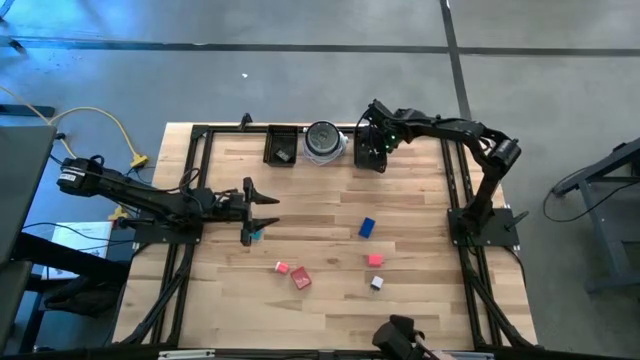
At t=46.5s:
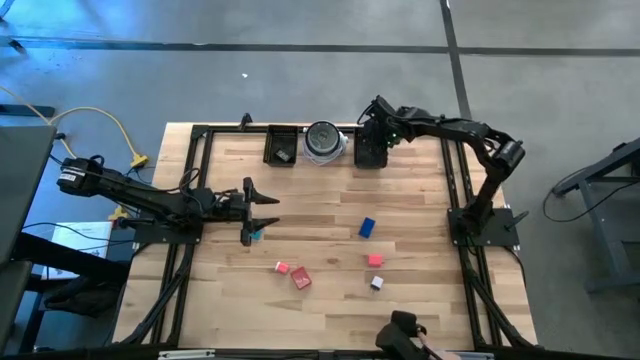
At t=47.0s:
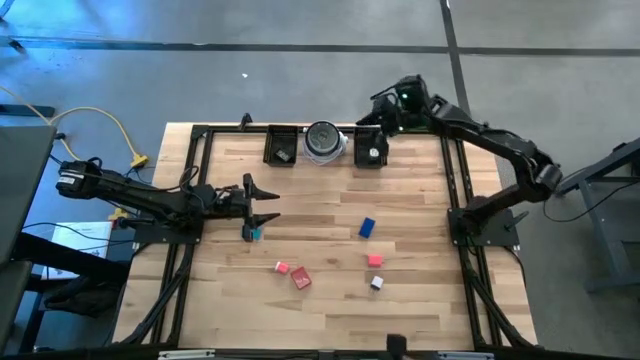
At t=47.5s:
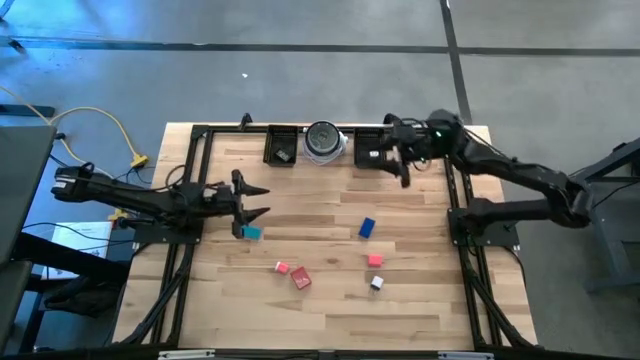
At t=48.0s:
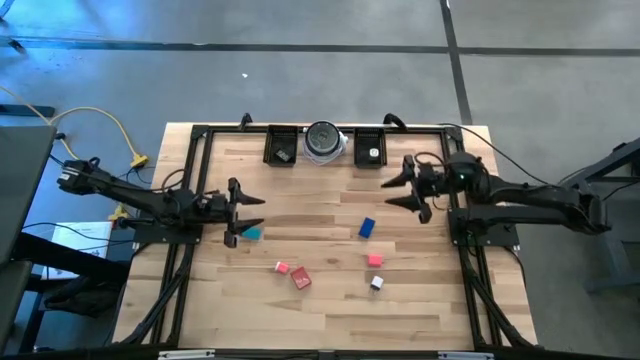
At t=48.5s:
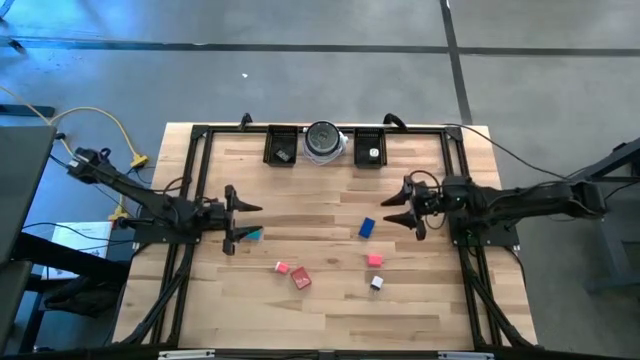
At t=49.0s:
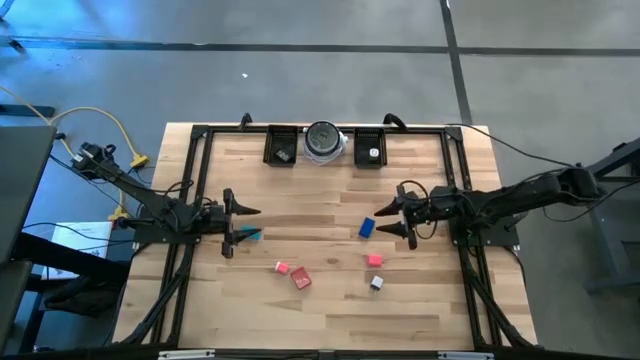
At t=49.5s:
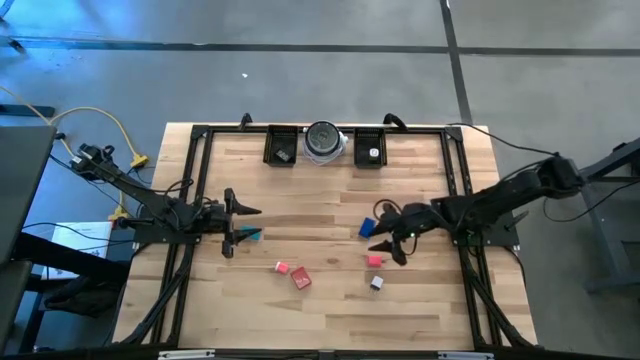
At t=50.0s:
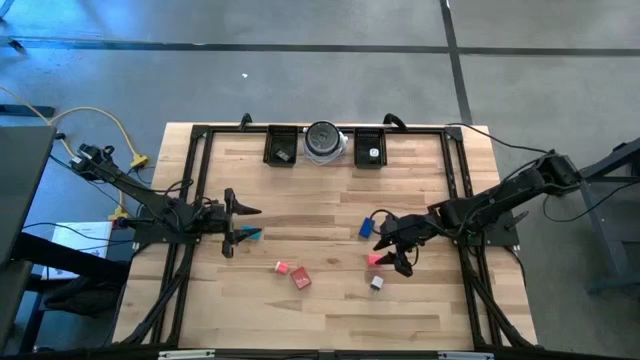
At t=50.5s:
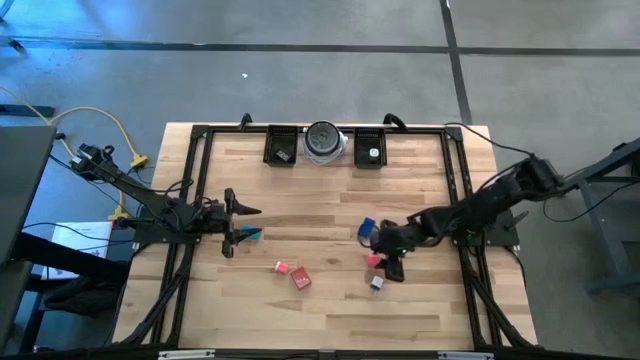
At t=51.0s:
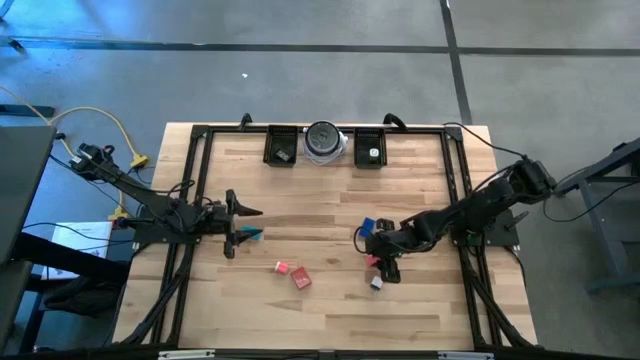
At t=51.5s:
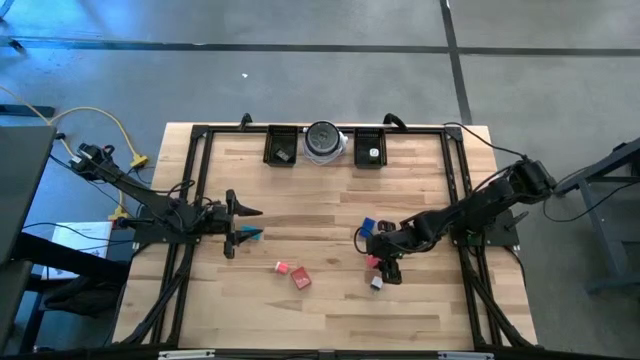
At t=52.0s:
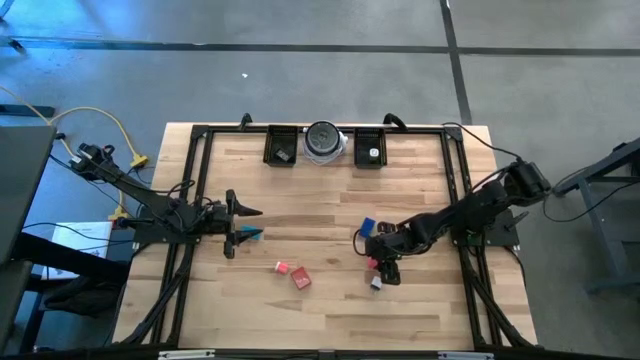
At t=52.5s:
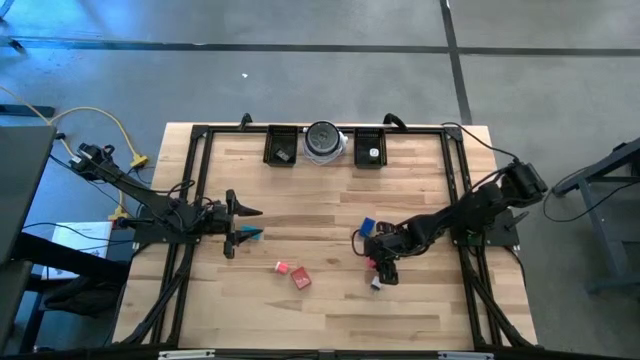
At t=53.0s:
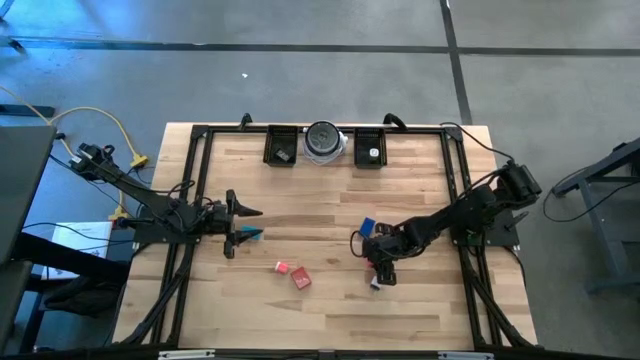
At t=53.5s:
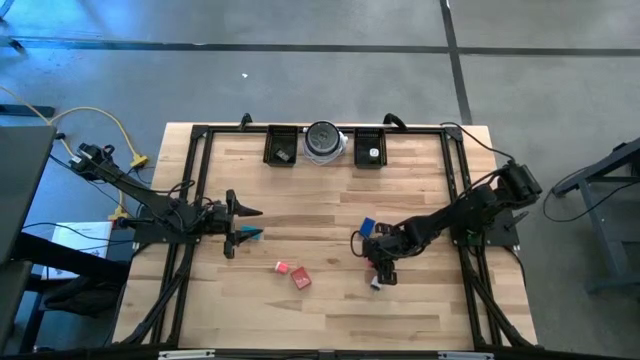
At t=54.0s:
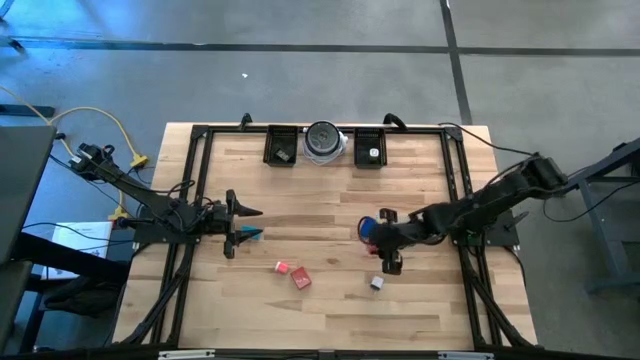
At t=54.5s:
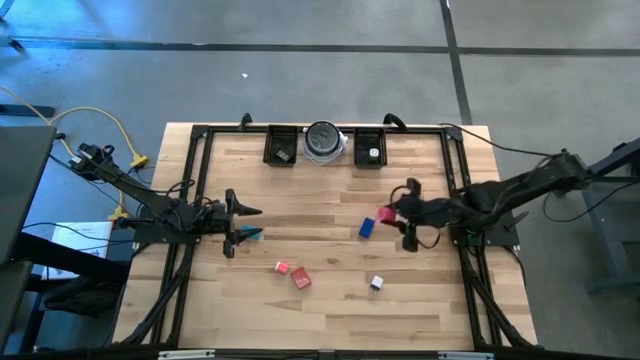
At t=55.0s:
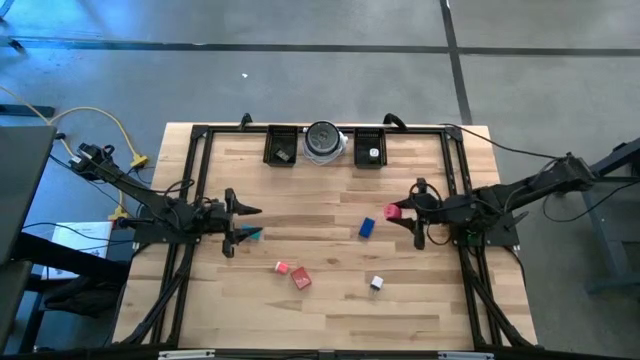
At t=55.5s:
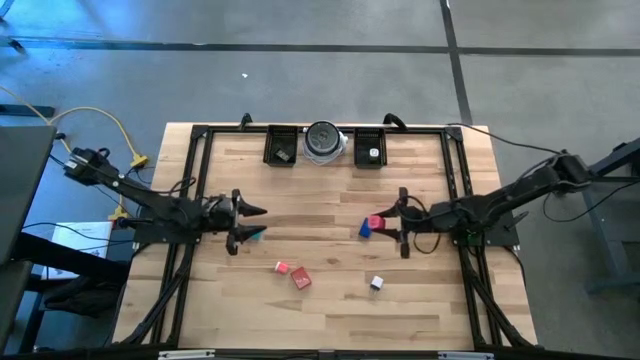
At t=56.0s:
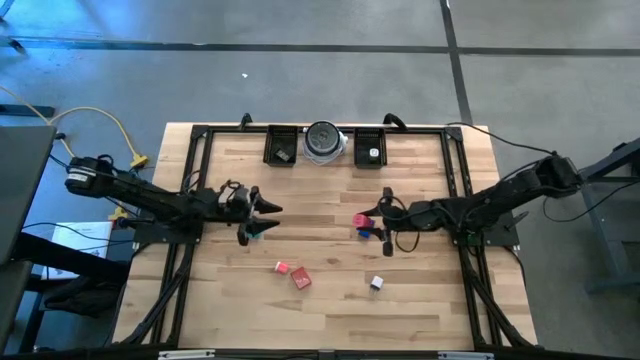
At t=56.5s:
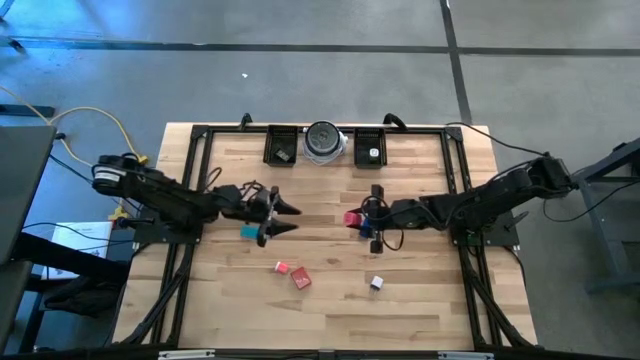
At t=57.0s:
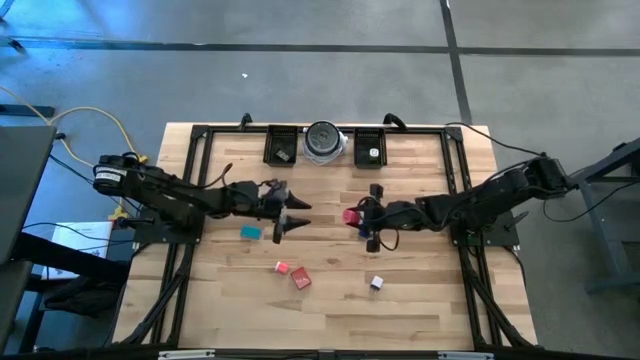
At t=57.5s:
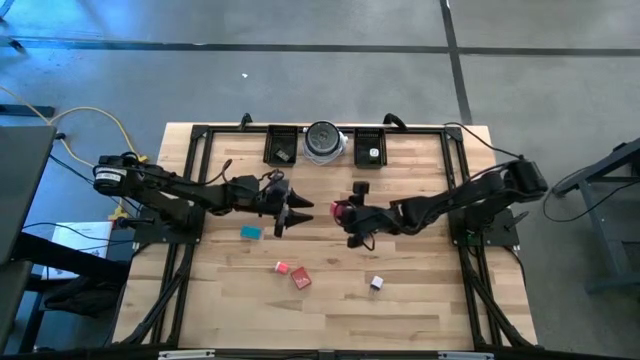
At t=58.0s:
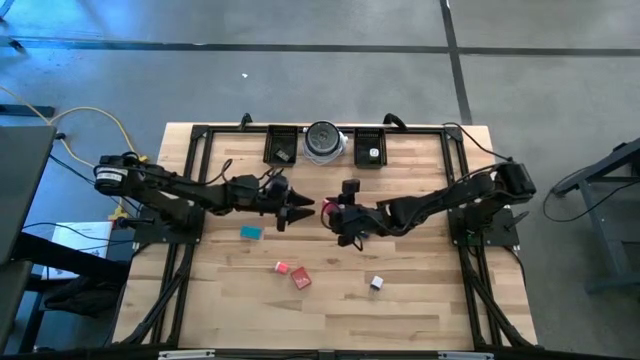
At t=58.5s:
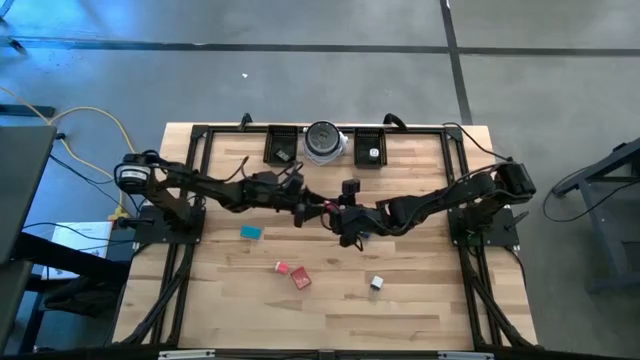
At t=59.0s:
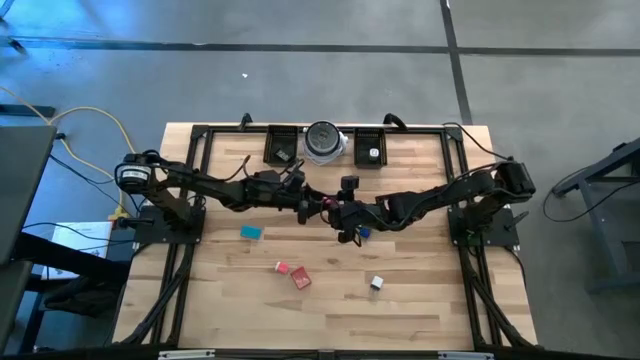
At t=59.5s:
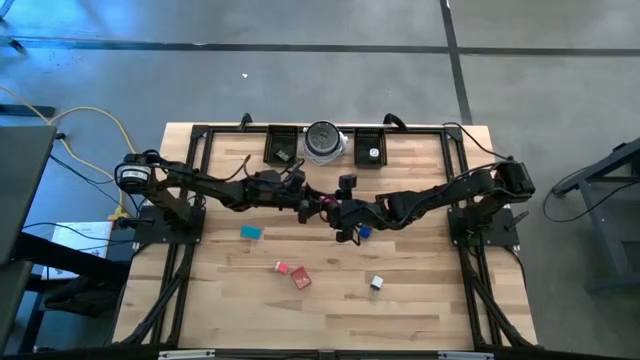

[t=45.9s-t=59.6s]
Task: Pick & Place Office items
Put the pink charger adapter into the right black basket

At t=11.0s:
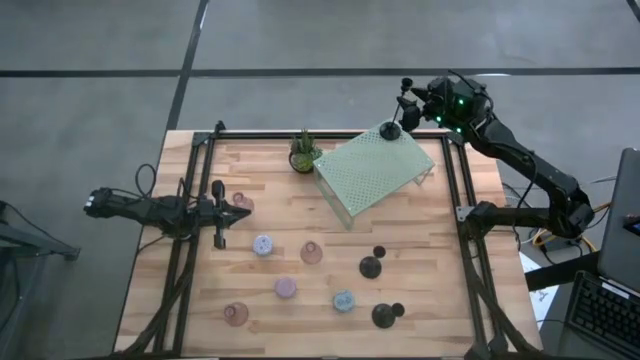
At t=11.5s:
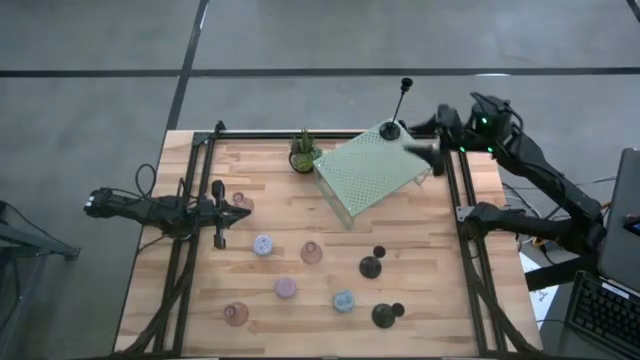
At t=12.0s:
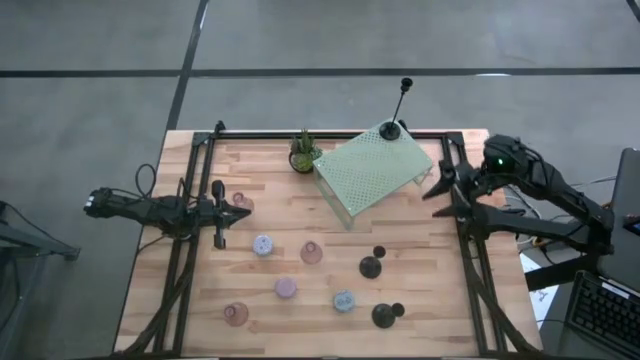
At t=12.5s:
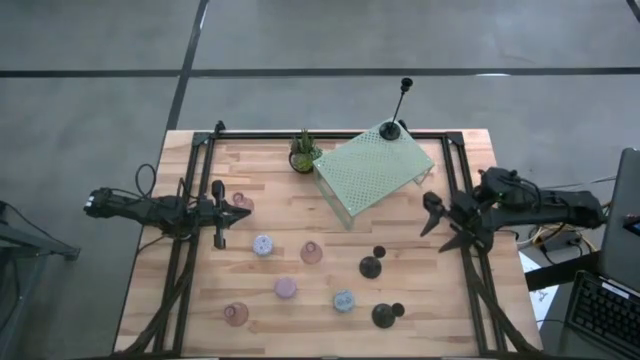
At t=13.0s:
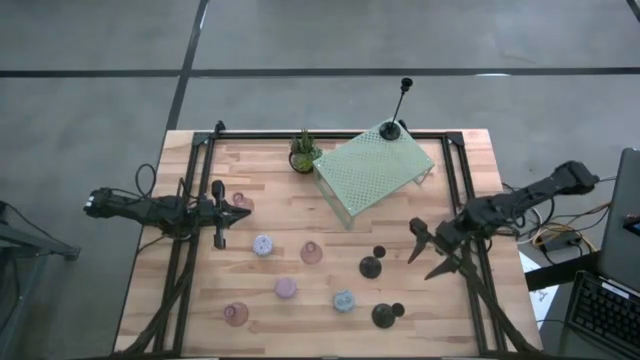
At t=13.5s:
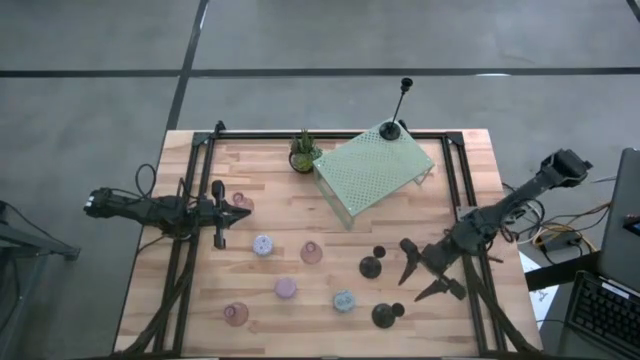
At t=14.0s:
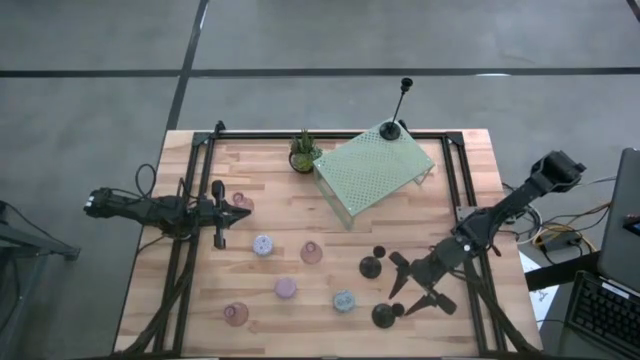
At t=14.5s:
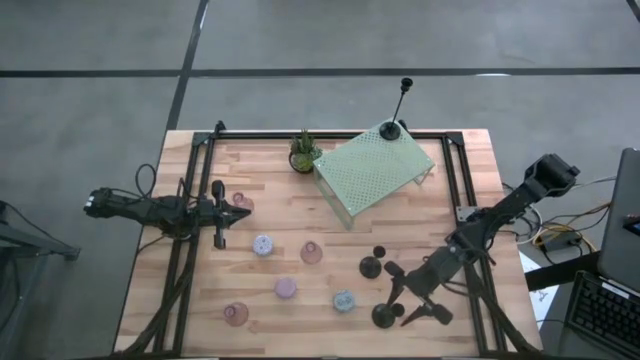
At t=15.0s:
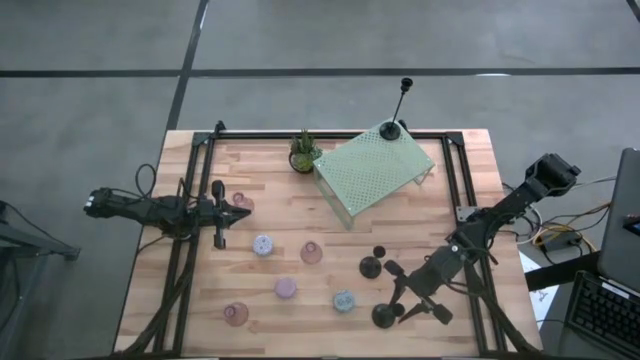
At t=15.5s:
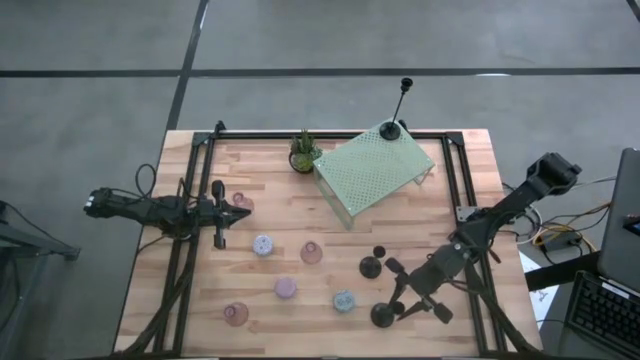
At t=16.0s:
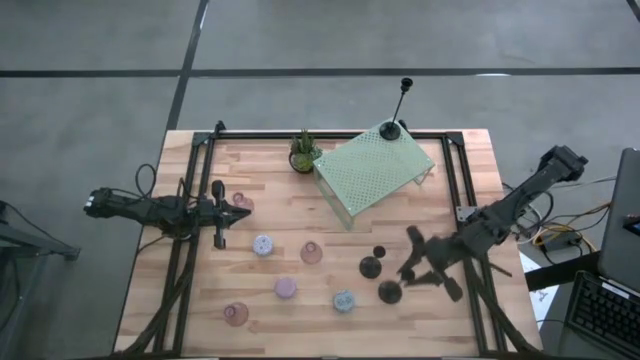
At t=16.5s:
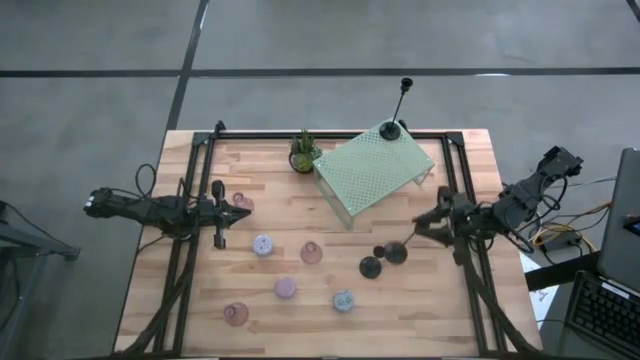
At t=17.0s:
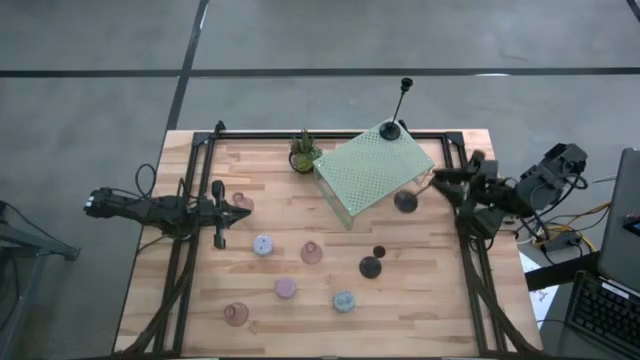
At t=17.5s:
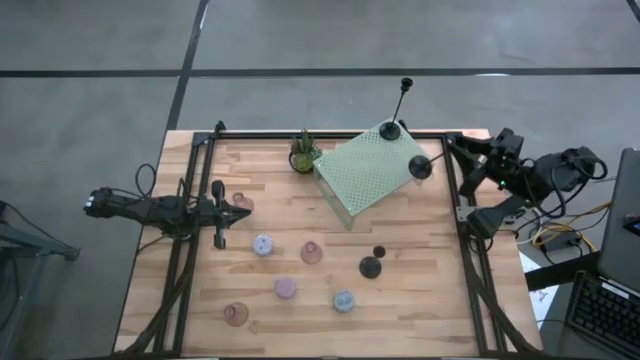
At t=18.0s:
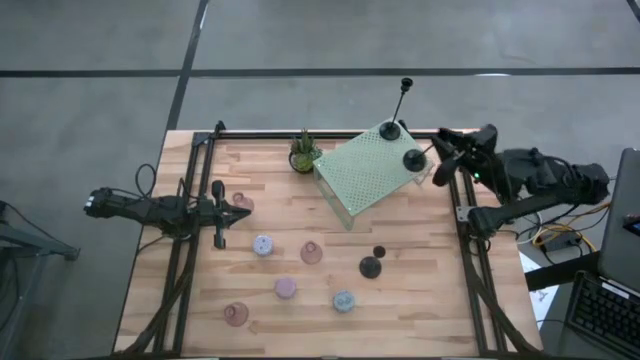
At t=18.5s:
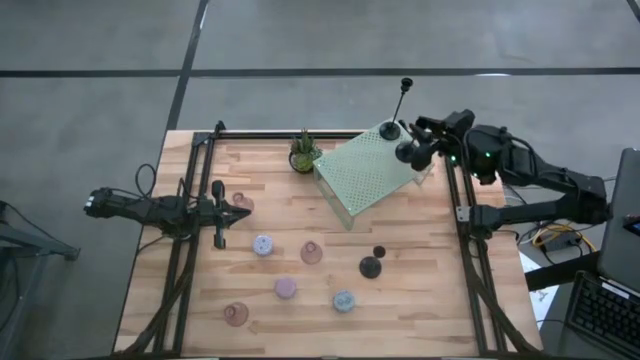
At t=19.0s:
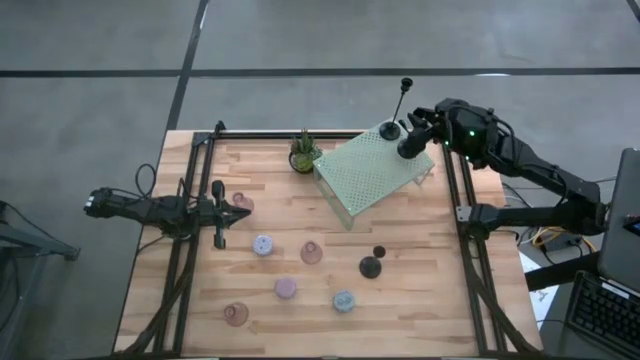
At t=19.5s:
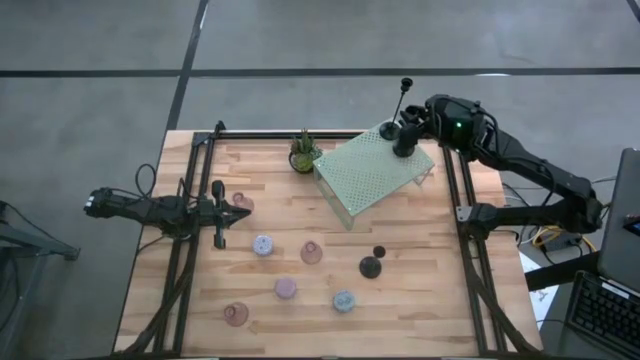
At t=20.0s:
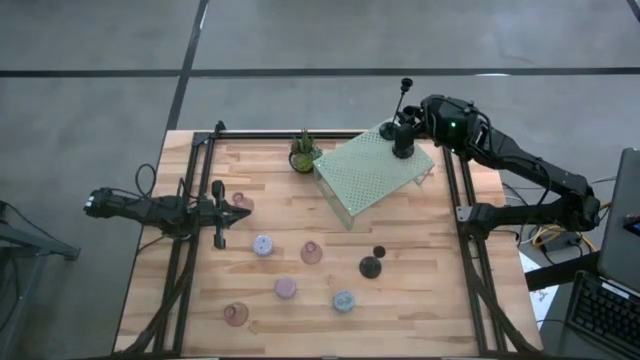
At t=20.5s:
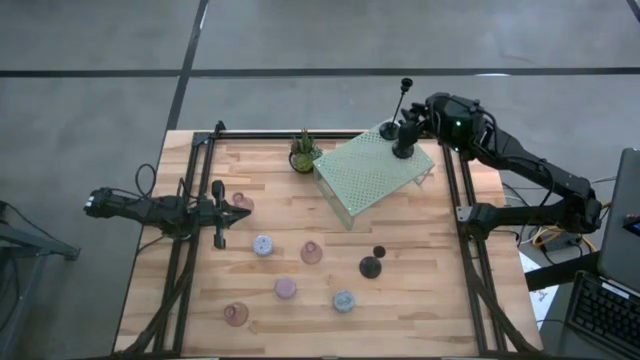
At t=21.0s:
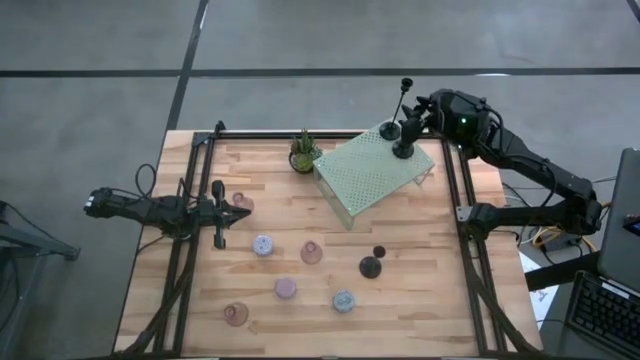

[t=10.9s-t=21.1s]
Task: Pick & Place candle stick holders
Put the bottom black candle holder on the shelf aligned with the other black candle holder
